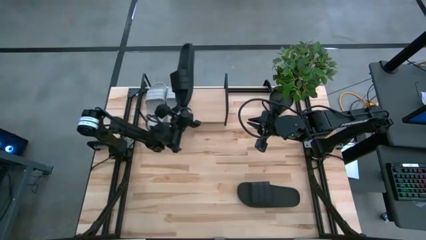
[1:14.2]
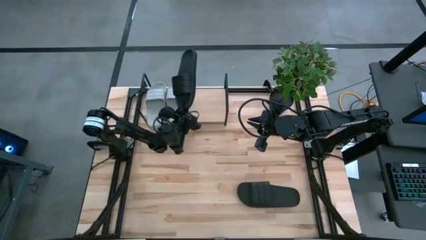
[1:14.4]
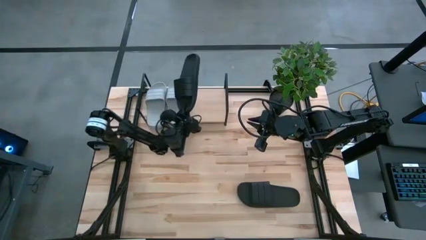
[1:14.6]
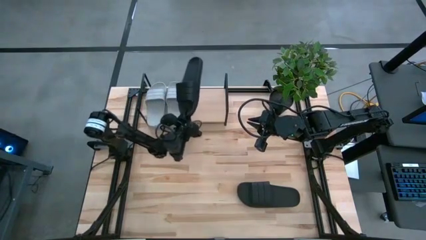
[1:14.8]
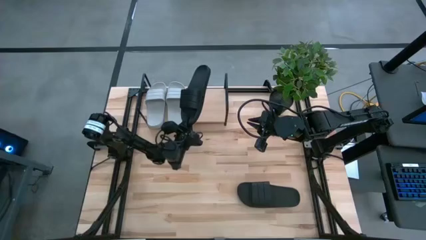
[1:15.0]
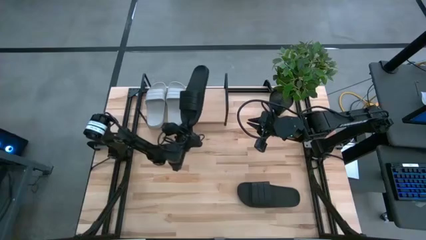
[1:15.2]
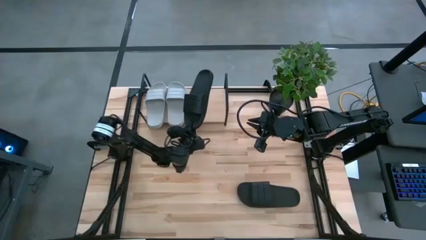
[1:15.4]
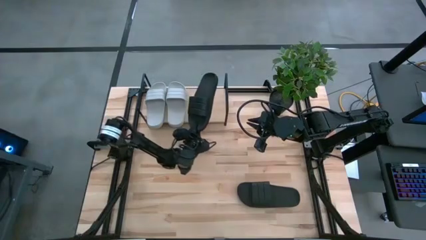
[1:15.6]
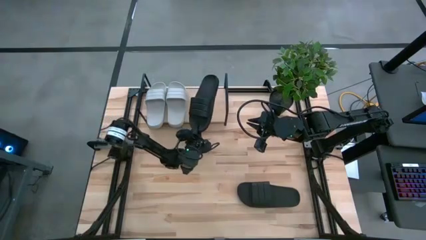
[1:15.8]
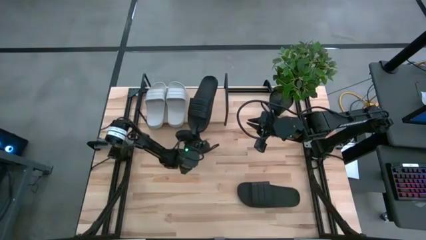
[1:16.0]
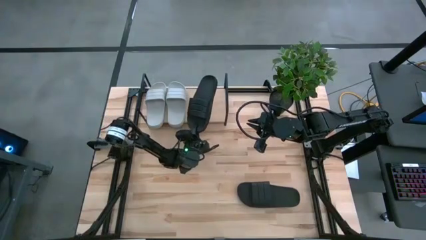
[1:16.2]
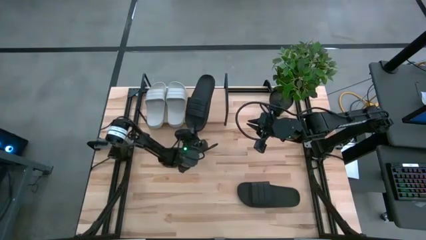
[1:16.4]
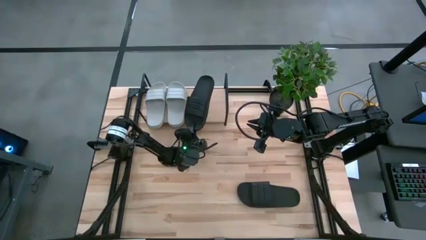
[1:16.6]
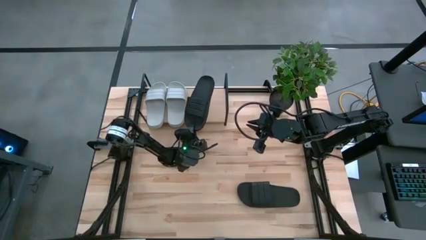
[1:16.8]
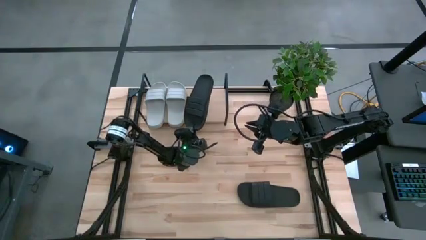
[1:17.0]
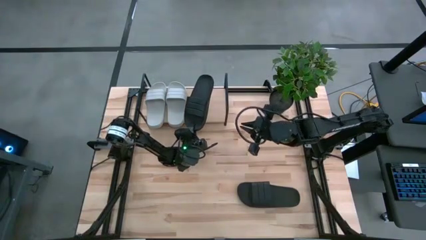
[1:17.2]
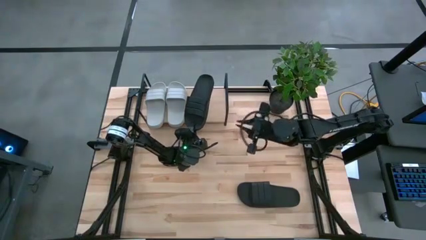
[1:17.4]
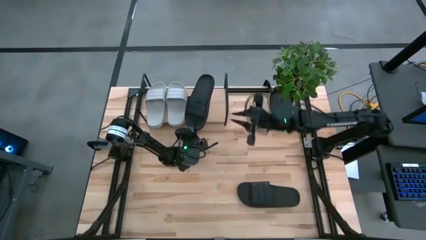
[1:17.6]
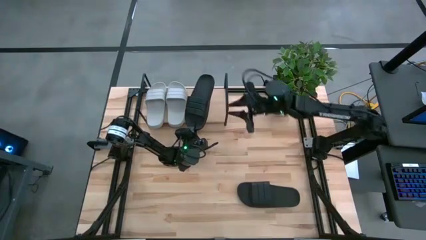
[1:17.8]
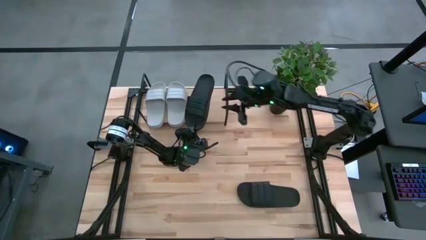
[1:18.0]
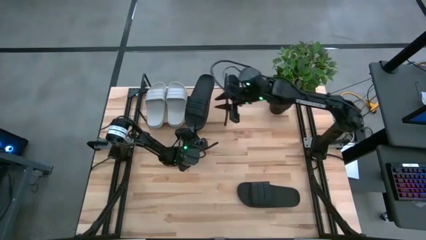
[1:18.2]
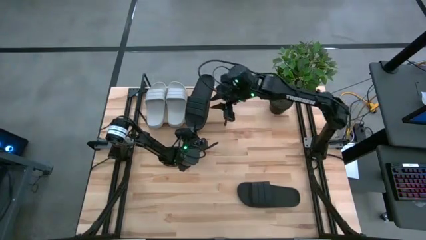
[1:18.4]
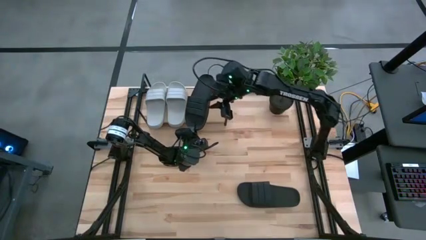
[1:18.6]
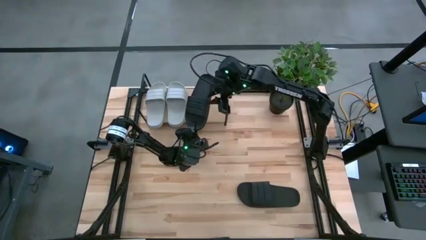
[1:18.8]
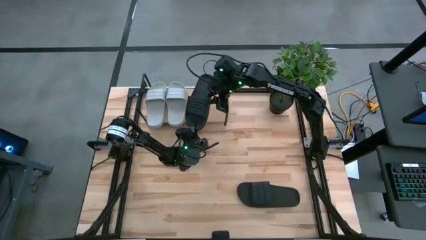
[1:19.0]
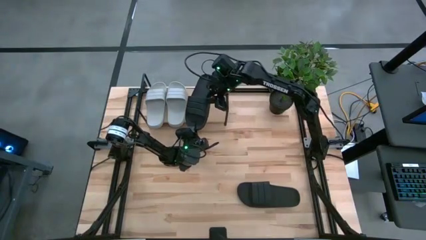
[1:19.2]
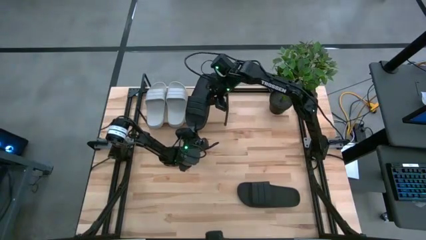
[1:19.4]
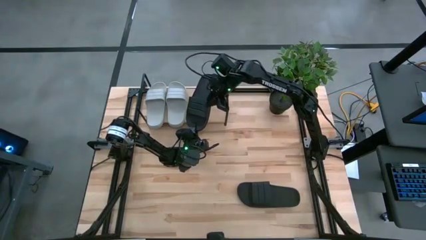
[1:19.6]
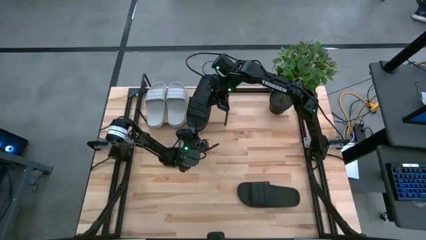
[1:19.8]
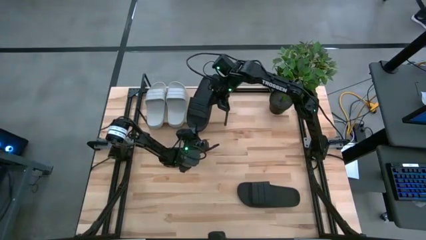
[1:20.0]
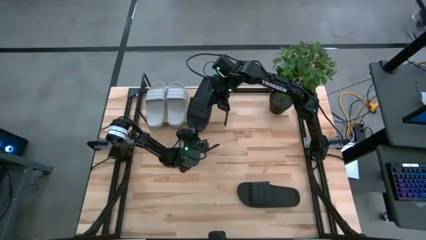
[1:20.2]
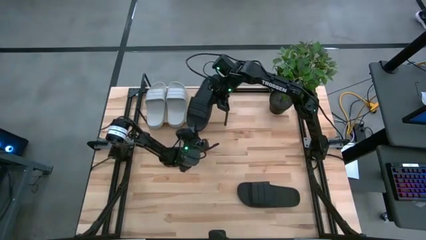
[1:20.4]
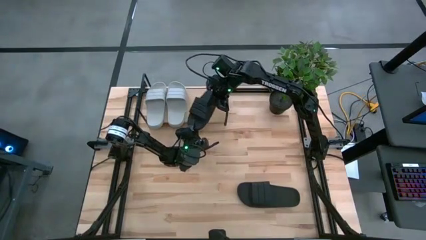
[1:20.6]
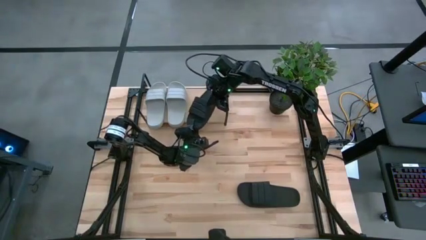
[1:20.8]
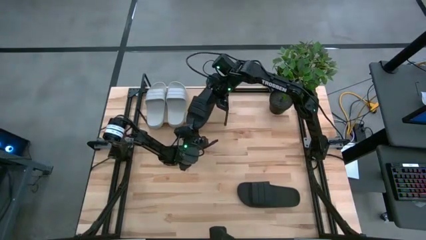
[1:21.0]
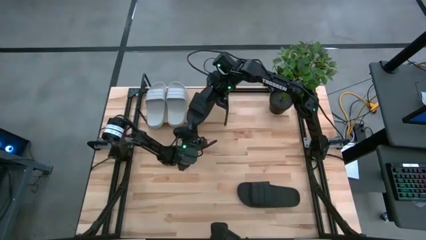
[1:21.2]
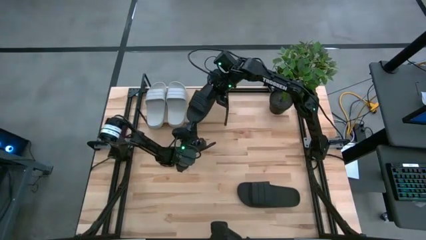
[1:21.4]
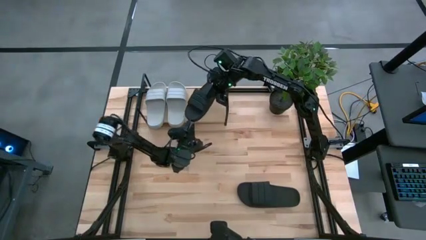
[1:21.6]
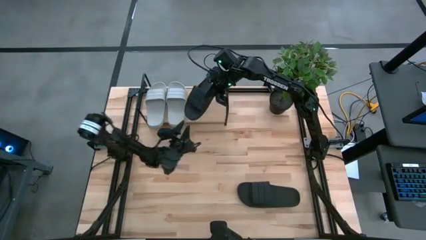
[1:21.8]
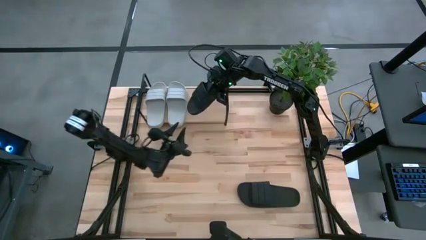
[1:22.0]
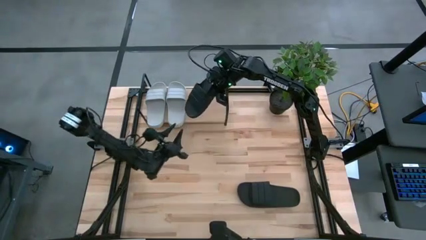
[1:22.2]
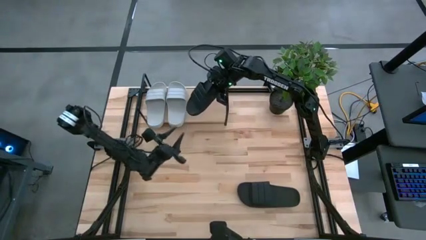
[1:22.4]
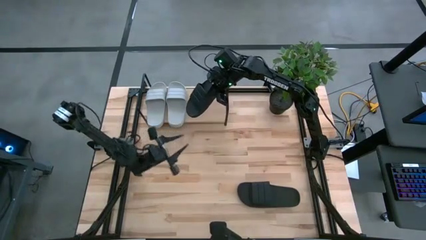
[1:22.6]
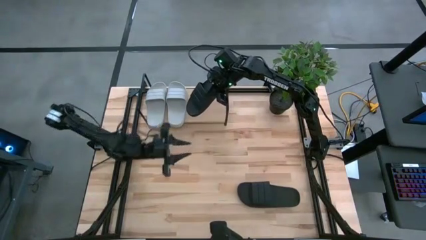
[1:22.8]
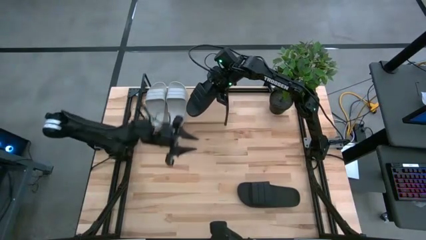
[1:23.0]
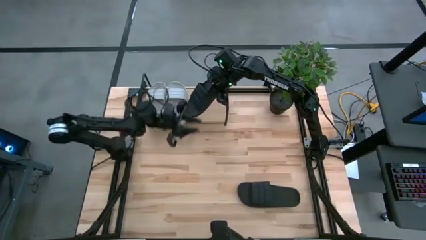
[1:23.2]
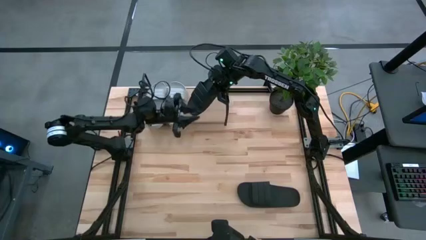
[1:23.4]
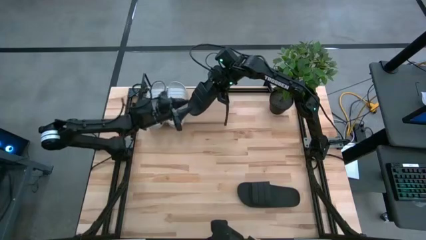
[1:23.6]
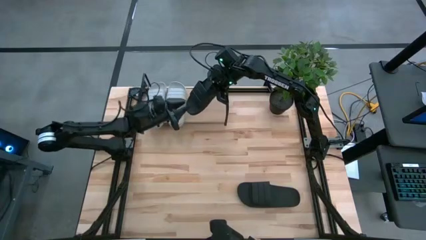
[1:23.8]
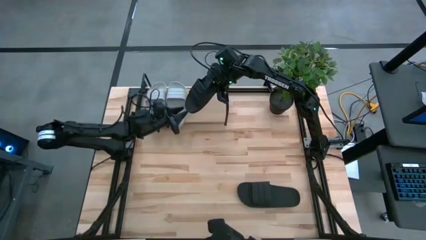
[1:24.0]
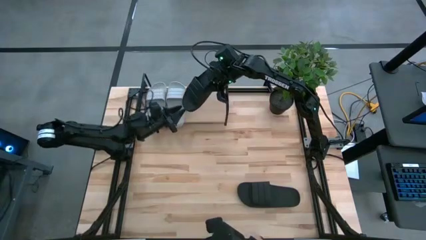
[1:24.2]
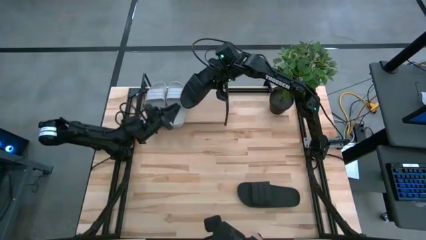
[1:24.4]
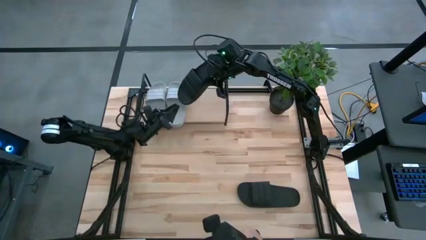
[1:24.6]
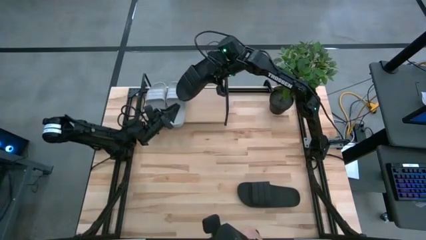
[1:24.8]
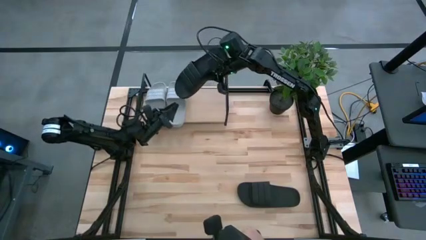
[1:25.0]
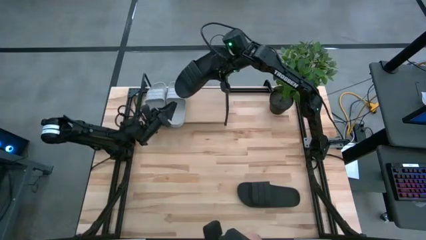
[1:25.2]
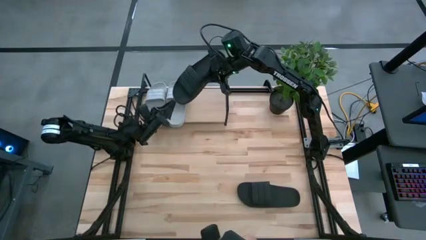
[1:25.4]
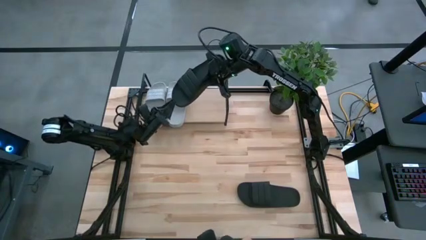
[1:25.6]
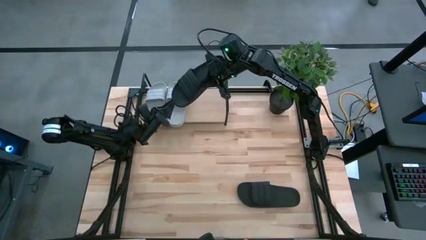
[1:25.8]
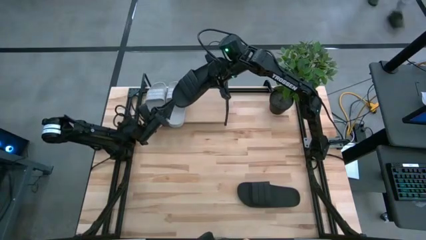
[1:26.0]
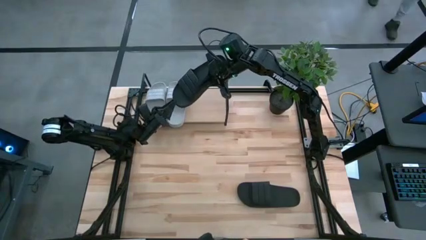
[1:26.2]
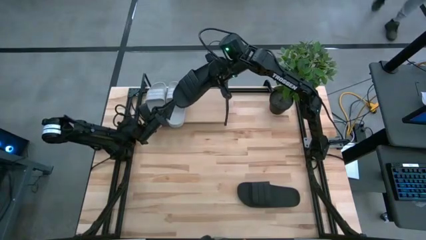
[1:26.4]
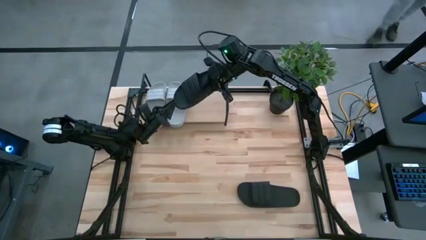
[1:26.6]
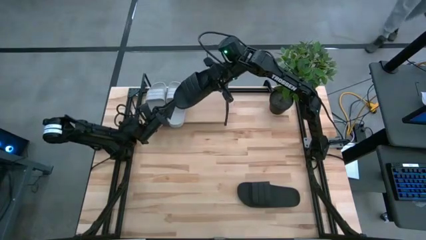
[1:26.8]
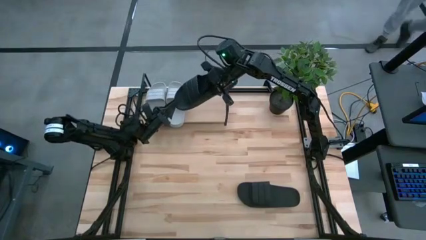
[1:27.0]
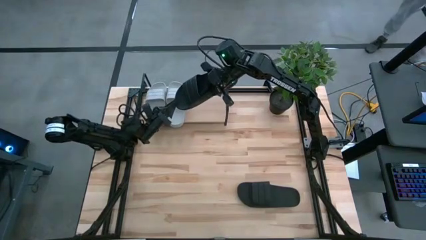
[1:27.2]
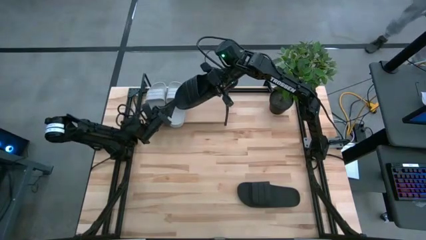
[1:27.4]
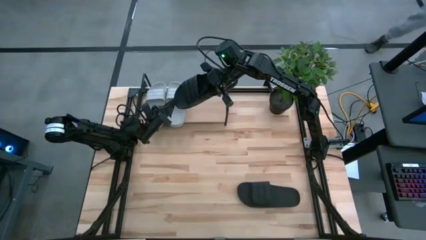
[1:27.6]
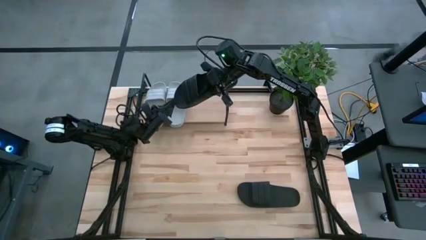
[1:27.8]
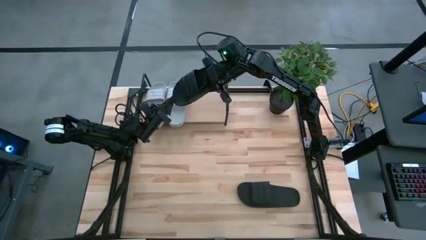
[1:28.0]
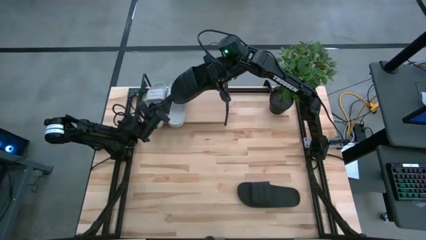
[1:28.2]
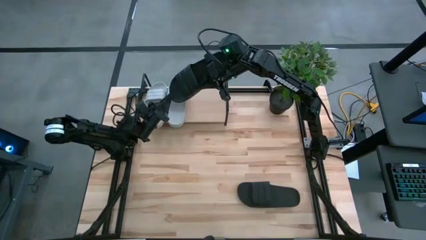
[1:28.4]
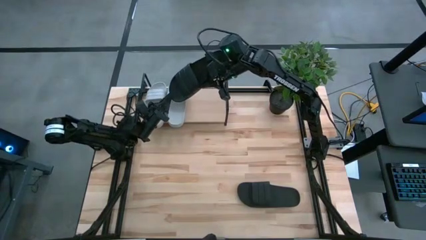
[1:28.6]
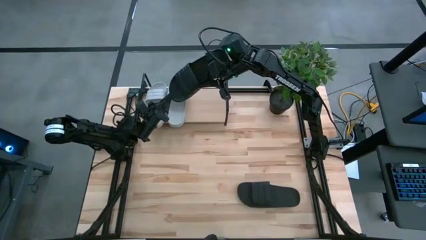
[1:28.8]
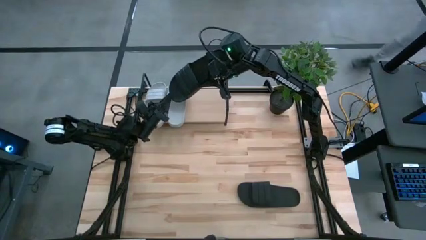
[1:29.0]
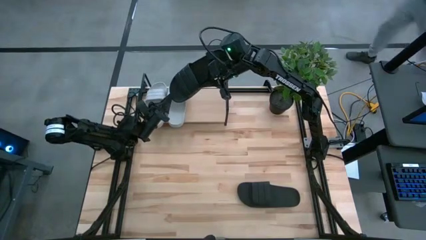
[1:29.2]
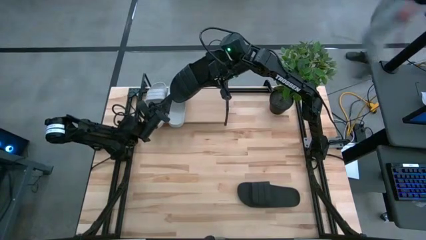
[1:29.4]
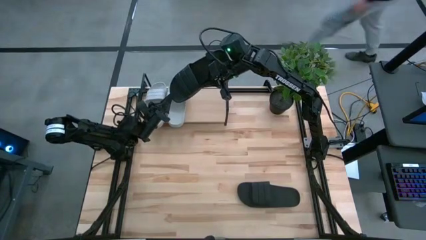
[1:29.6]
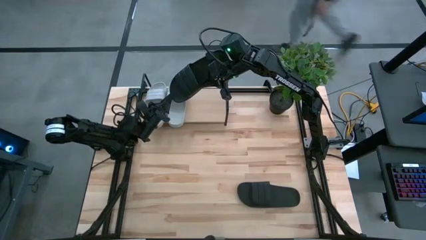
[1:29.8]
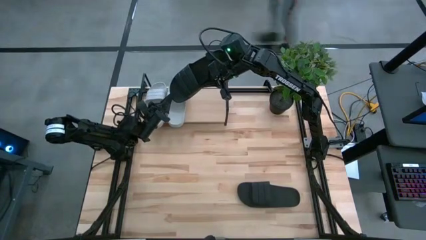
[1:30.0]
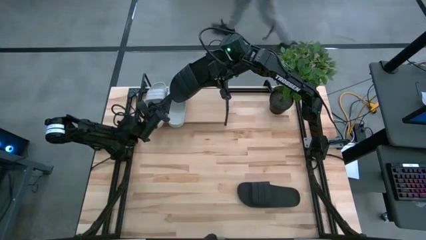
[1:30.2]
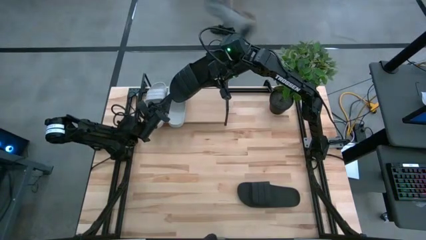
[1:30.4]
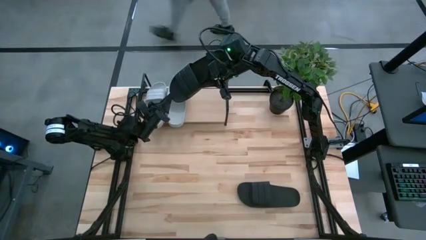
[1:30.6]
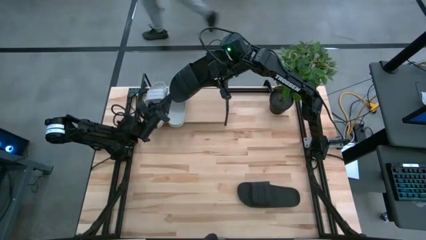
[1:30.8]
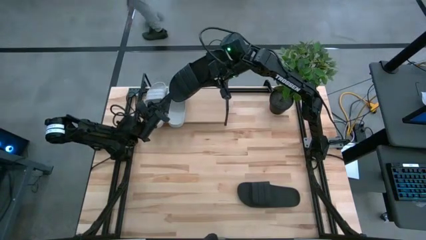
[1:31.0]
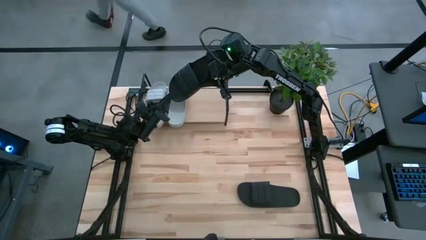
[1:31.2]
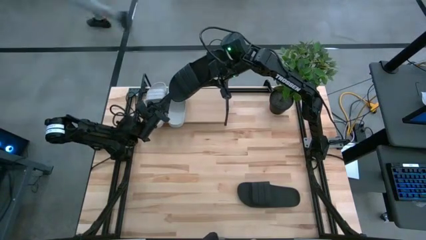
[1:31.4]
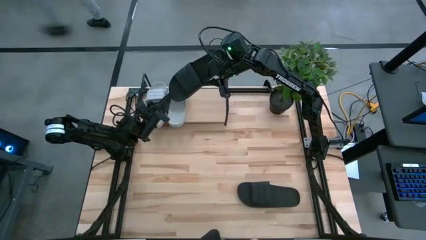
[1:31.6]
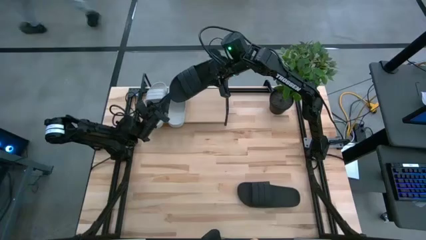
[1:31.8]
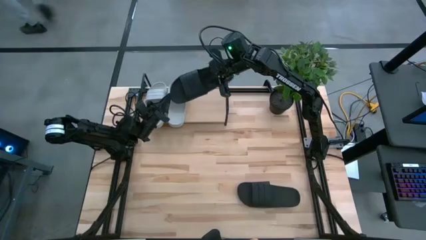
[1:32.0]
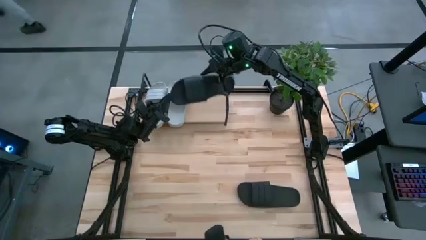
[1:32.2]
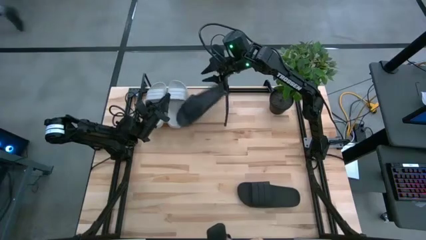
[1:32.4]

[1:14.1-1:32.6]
Task: Pick and place slides into the shelf
Put the top black slides on the shelf
